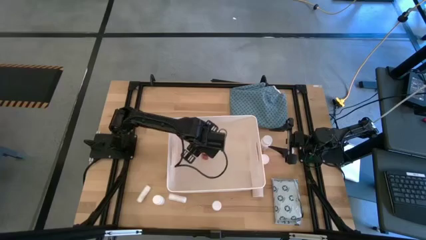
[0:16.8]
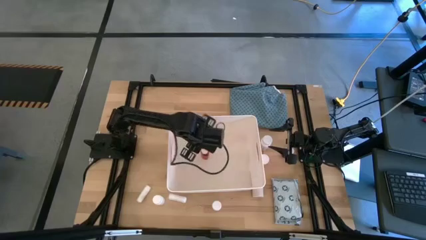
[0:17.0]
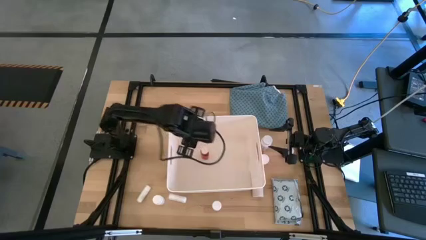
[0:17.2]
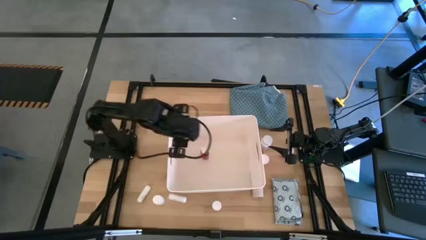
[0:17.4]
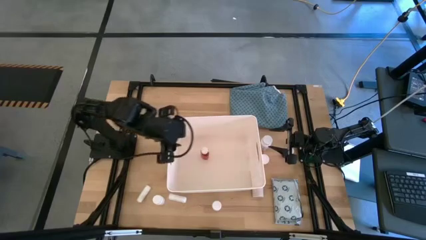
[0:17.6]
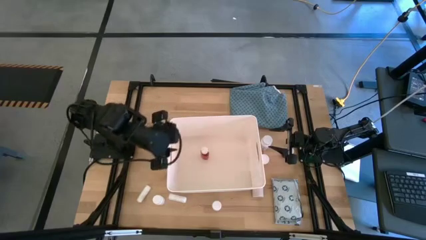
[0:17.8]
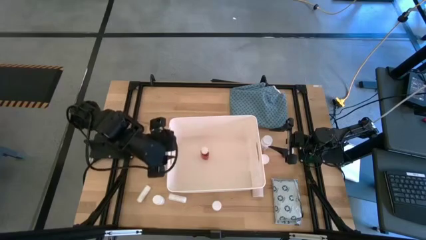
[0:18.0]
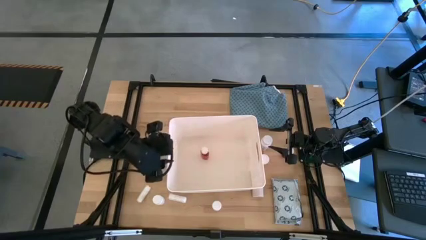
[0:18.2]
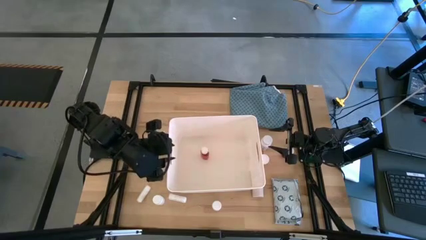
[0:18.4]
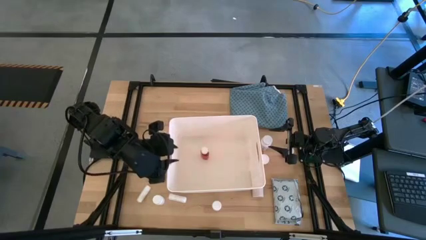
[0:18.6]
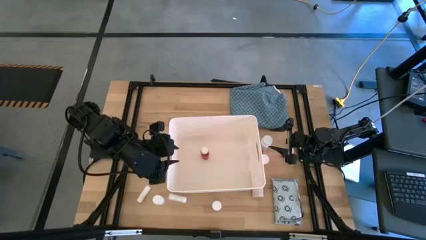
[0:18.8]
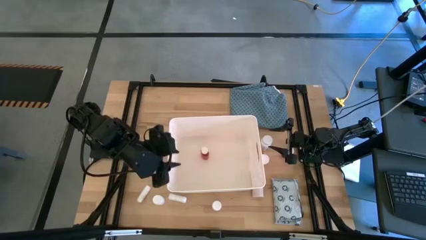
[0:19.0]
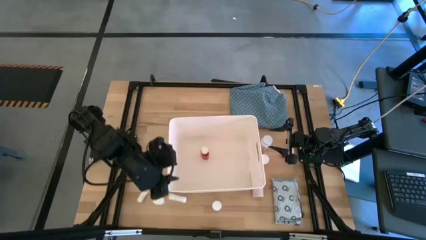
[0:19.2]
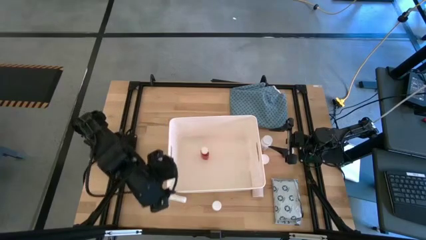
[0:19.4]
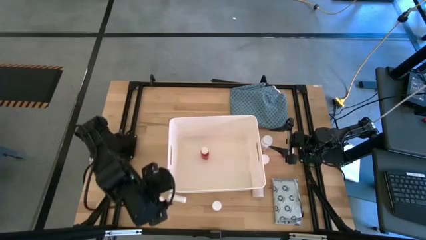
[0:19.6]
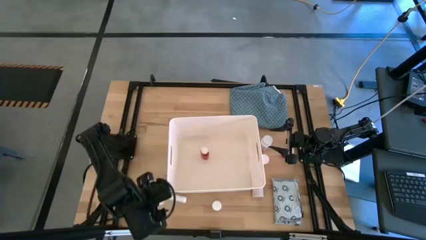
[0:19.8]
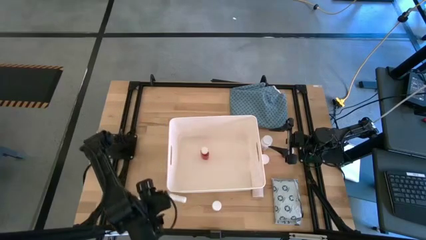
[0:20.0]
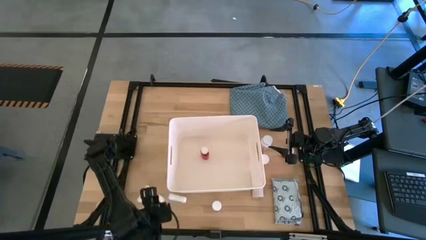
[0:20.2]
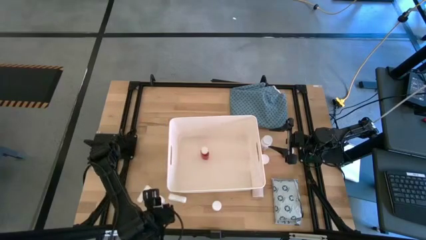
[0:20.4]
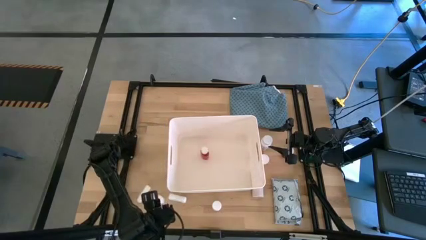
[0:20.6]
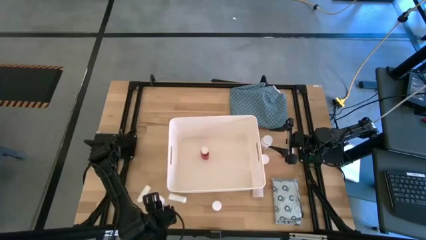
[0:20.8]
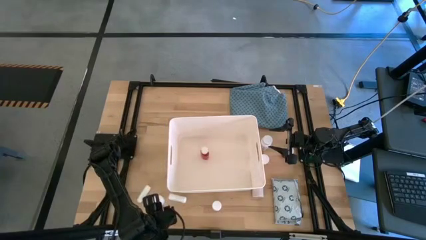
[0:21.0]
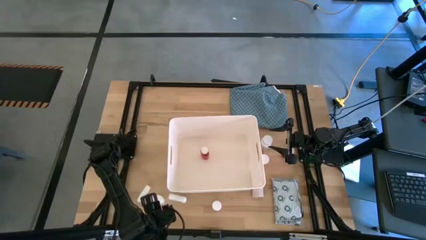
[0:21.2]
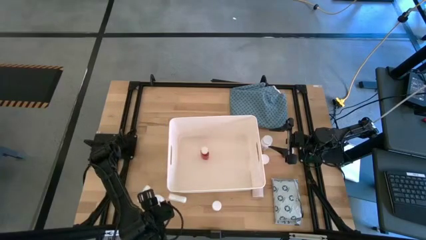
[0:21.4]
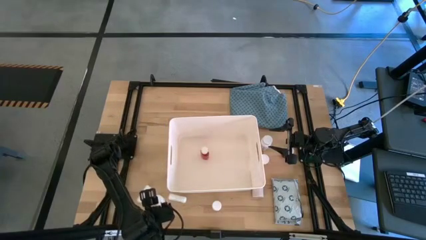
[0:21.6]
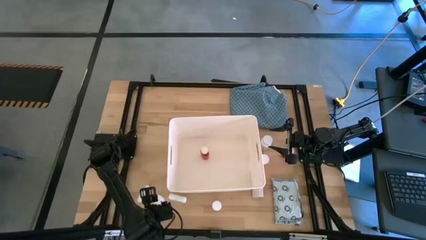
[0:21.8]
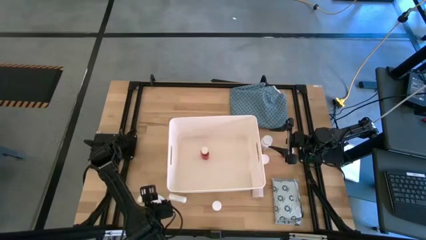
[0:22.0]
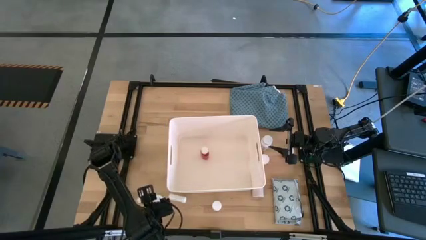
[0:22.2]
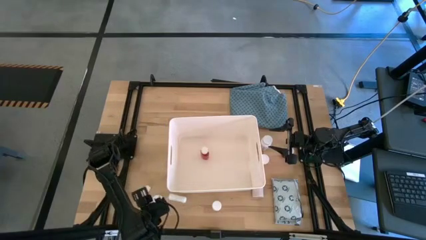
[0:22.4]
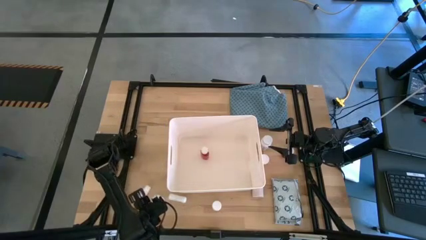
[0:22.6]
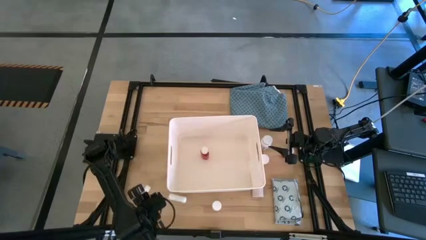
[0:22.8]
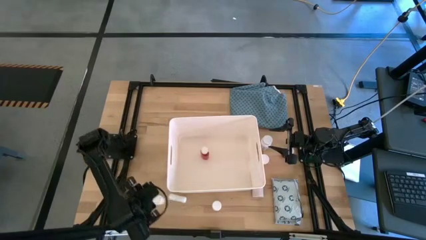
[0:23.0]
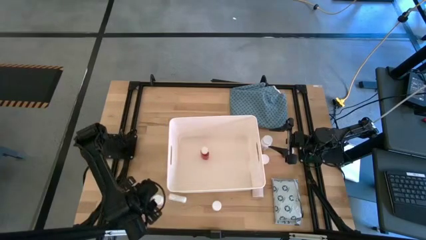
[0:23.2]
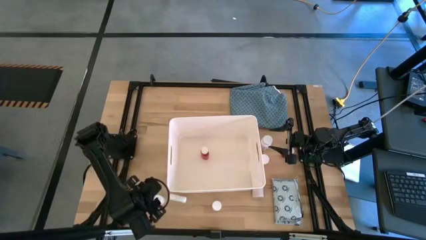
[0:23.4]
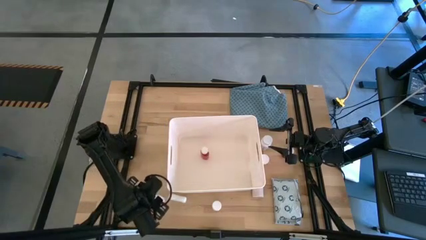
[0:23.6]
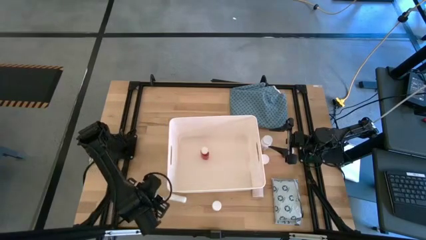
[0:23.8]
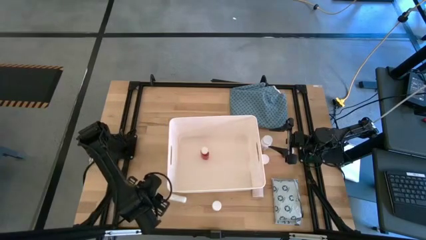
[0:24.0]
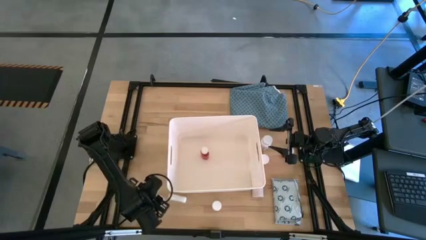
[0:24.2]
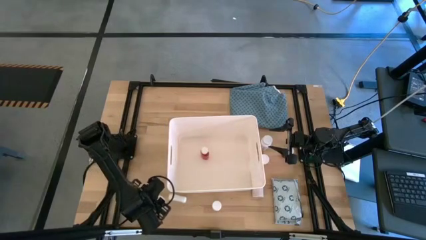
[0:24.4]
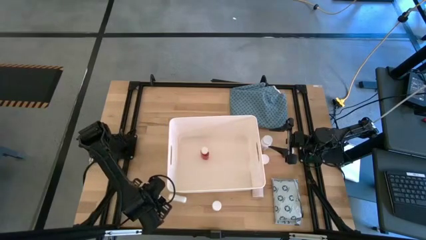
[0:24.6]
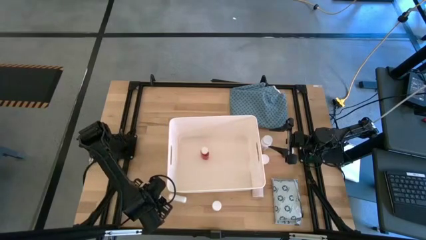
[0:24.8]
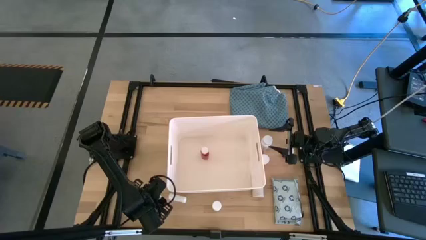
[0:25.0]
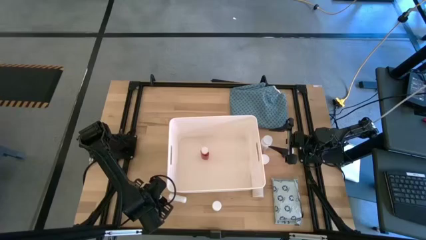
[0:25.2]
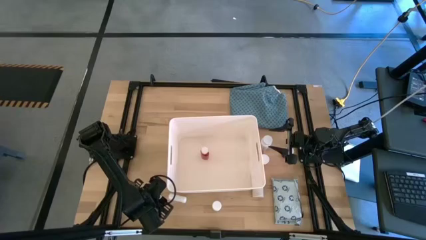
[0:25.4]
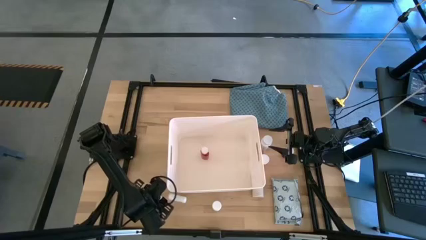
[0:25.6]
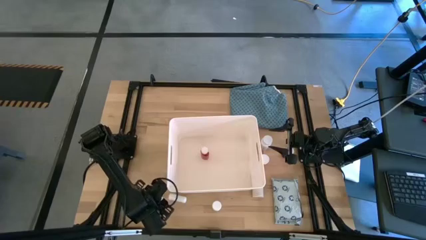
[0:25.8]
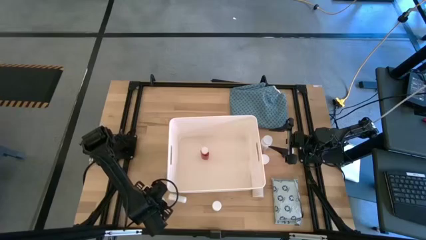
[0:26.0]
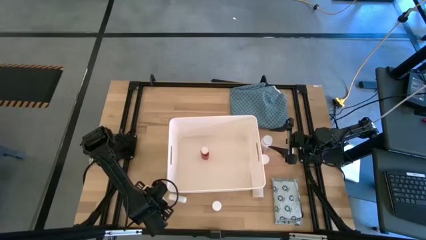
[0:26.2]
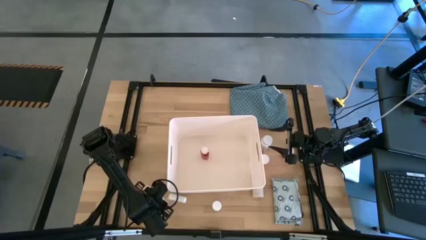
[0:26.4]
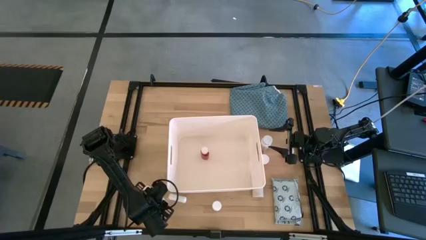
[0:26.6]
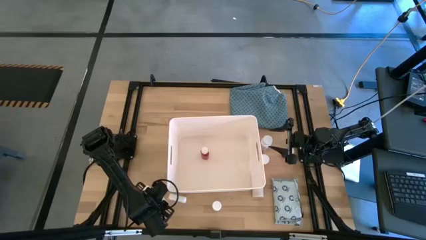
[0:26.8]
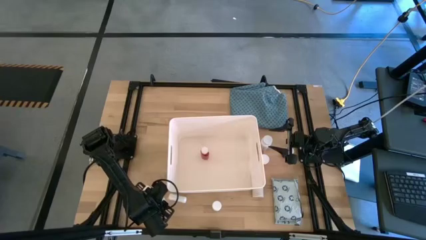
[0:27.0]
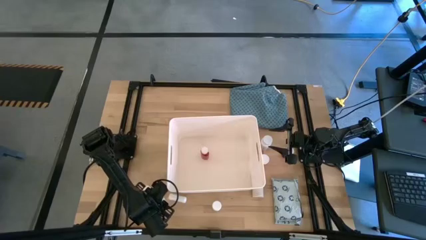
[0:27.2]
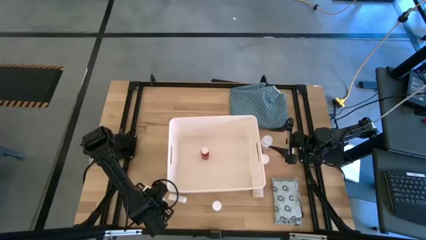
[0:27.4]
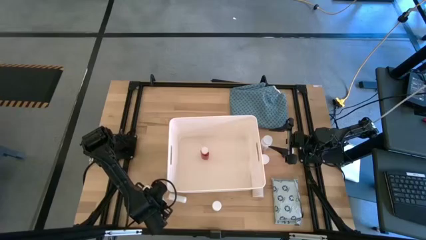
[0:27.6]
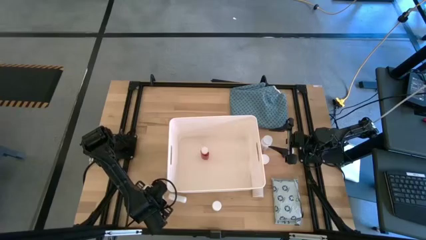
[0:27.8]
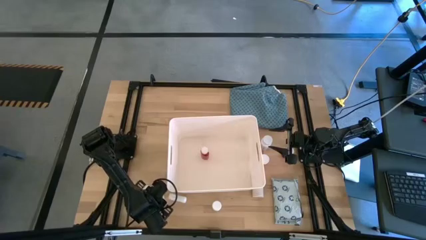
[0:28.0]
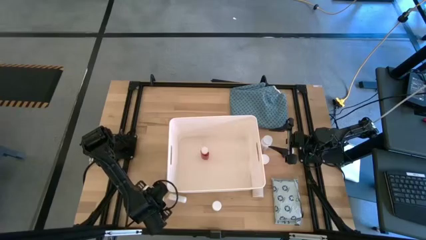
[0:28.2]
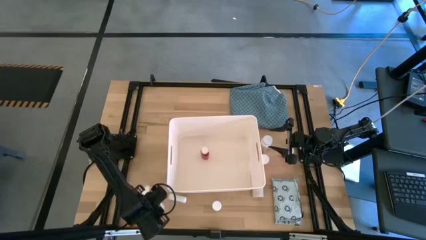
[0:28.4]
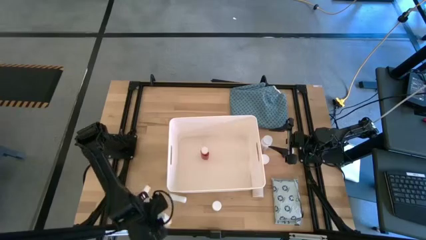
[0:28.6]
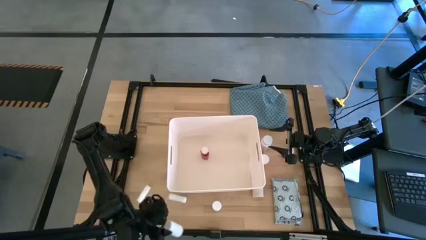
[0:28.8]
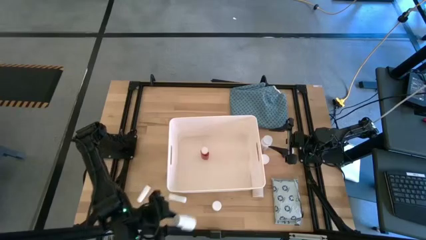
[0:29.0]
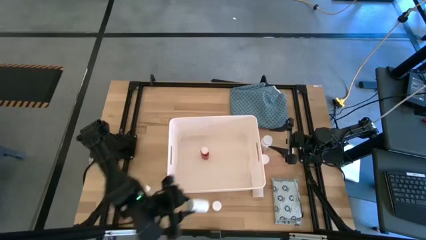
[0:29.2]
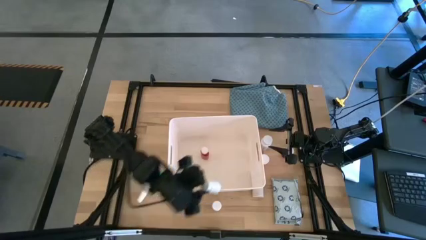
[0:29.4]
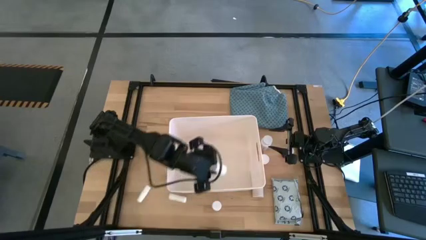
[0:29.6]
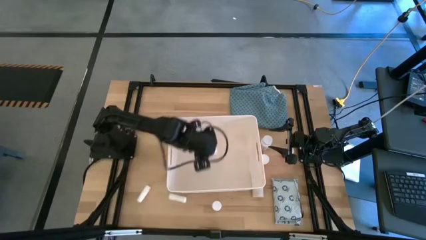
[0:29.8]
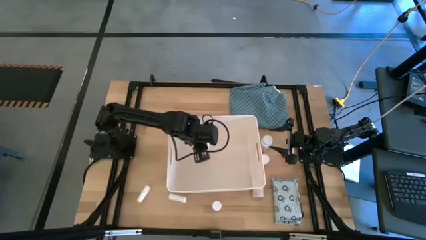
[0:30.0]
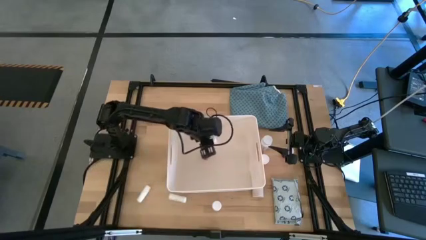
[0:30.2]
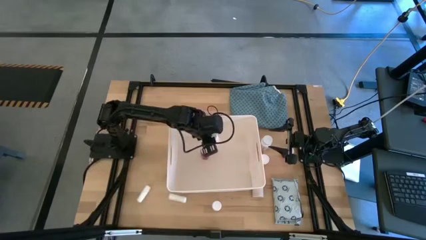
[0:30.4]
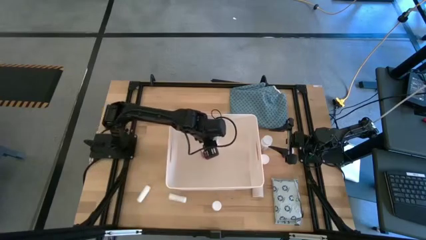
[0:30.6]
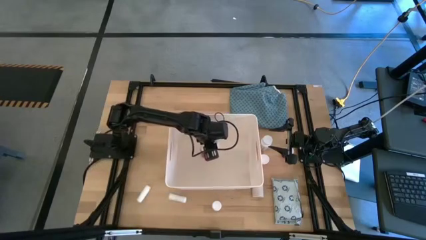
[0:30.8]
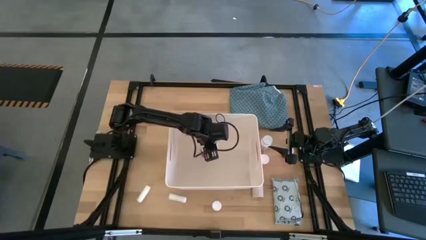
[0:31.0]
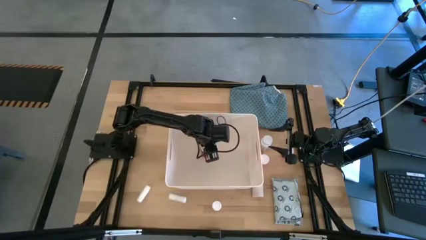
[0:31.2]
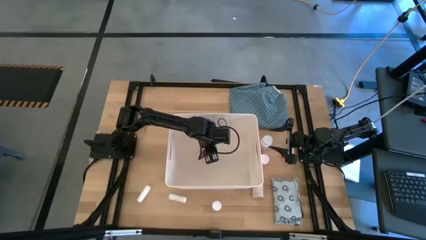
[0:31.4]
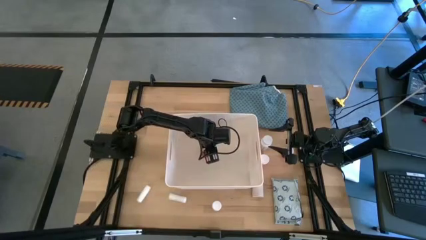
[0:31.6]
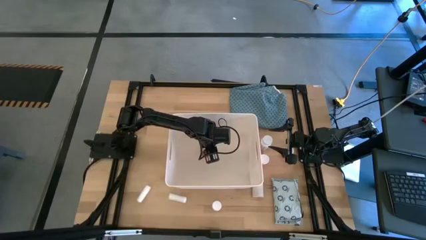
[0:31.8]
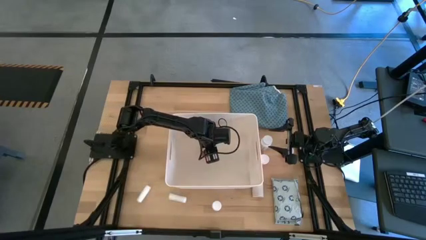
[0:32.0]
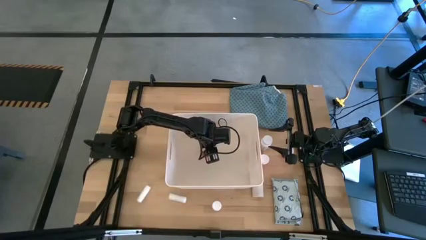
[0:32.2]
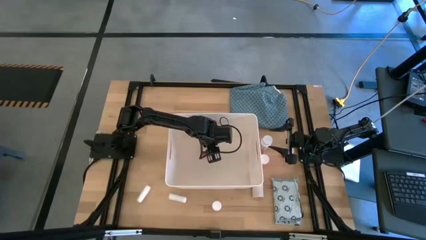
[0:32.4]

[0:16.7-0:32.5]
Task: Pick & place medical supplies in basket/bin
Put the bottom left white medicine bottle into the white bin
